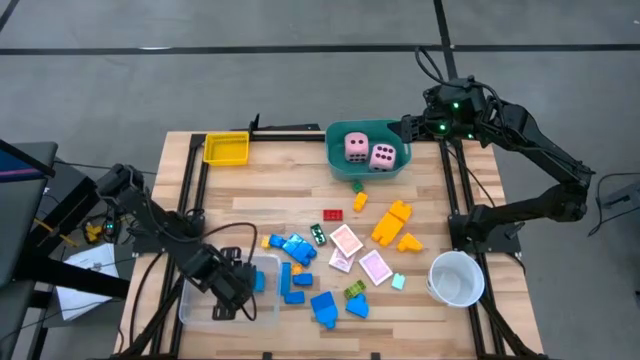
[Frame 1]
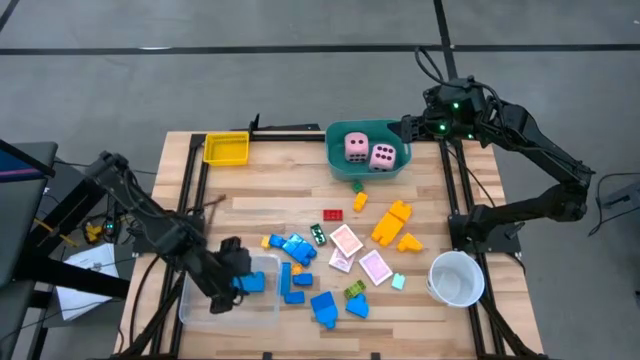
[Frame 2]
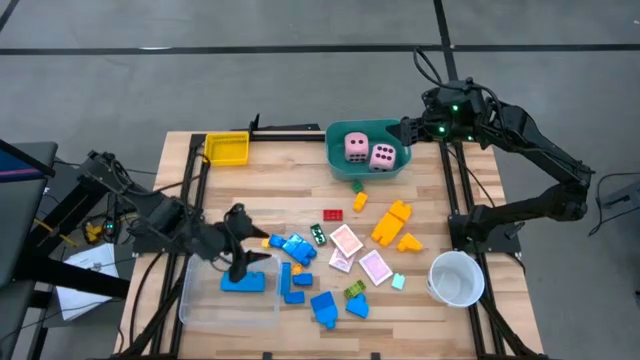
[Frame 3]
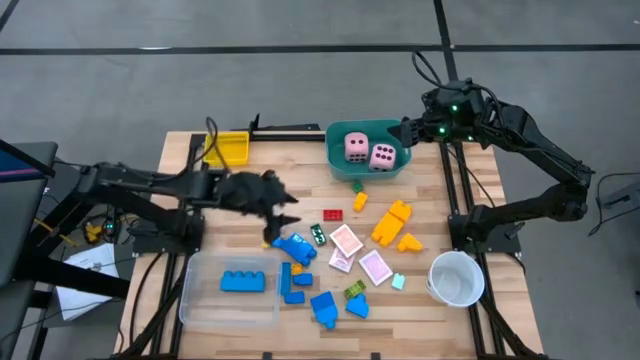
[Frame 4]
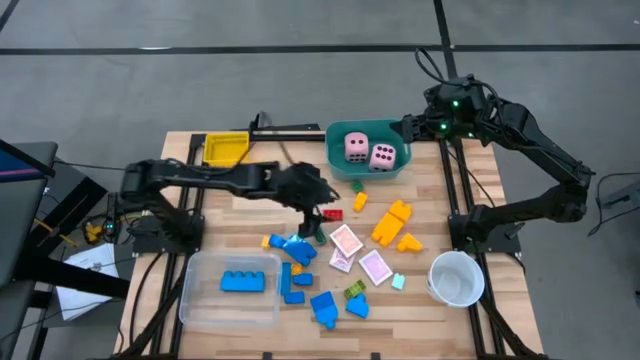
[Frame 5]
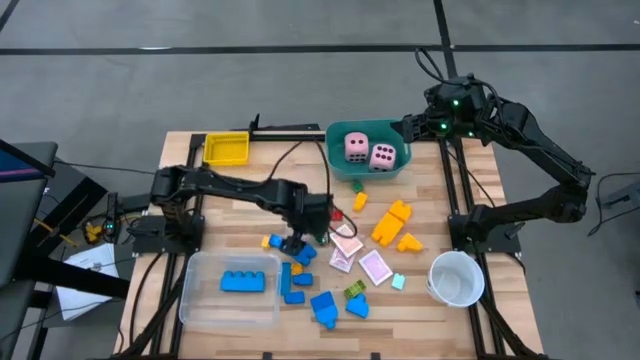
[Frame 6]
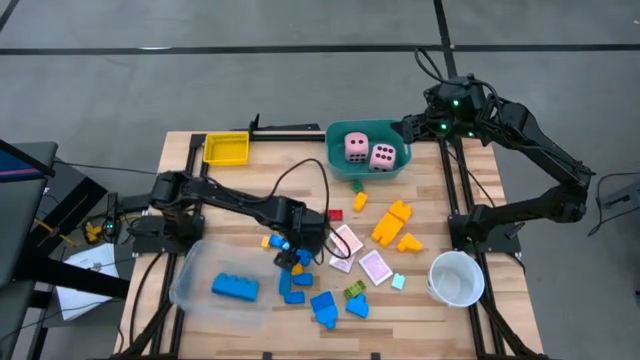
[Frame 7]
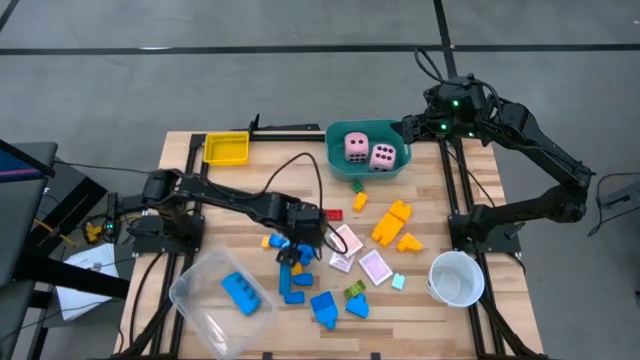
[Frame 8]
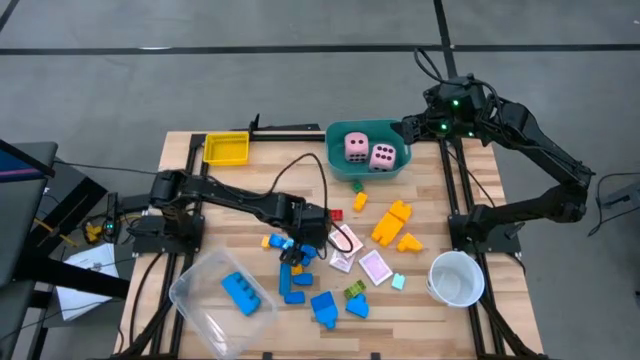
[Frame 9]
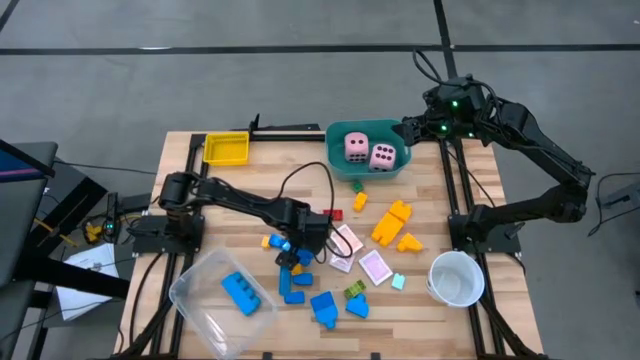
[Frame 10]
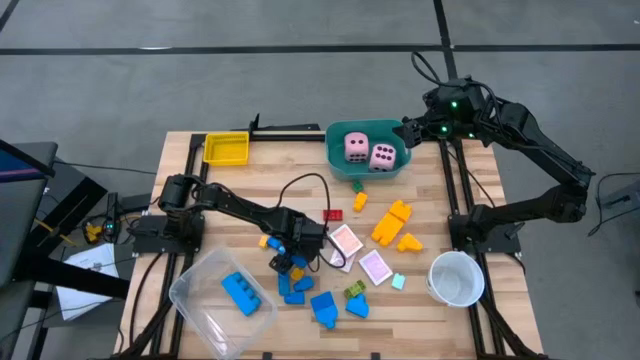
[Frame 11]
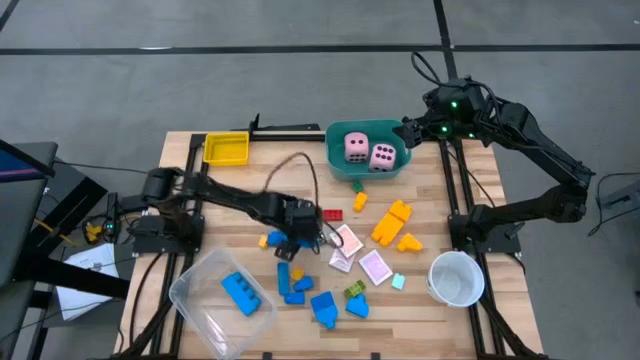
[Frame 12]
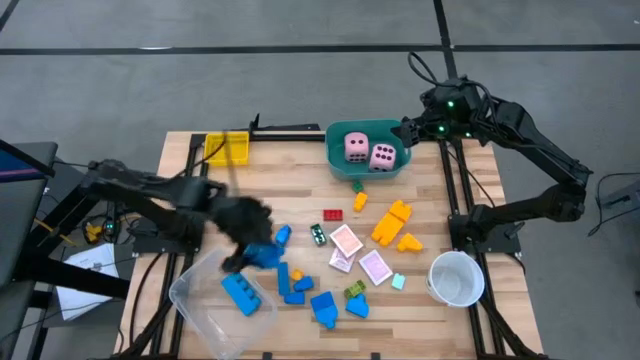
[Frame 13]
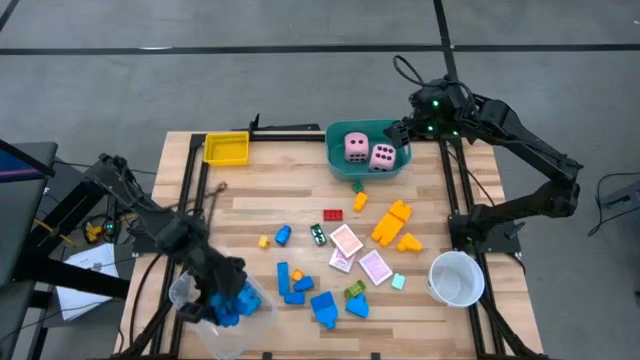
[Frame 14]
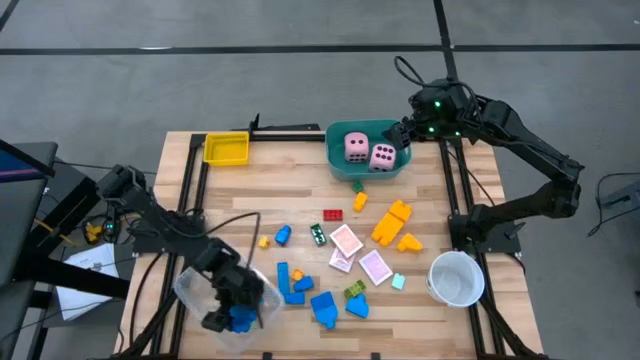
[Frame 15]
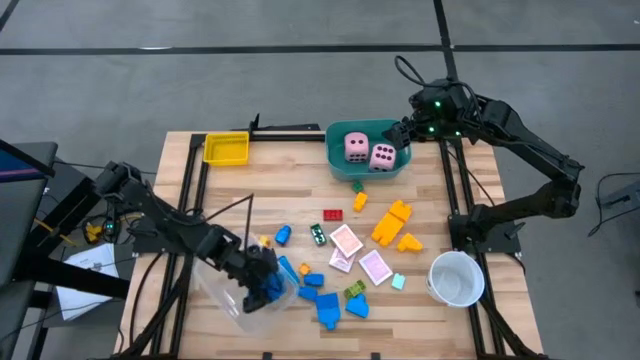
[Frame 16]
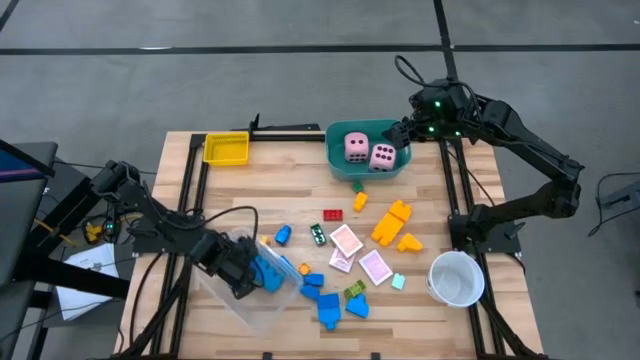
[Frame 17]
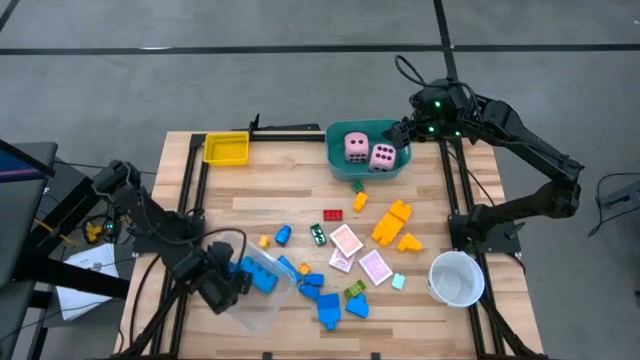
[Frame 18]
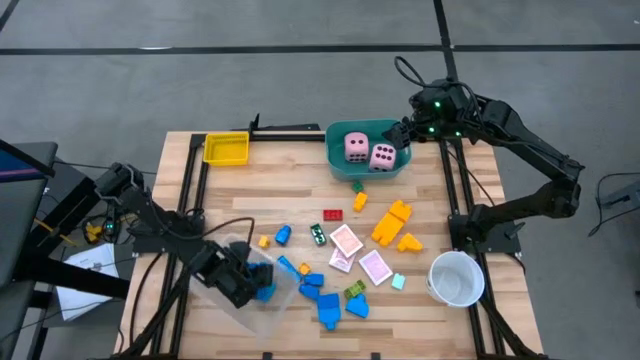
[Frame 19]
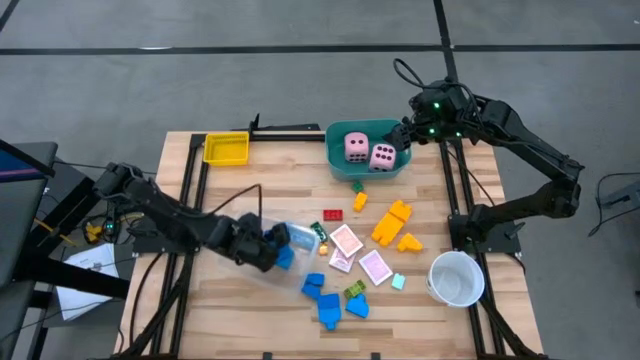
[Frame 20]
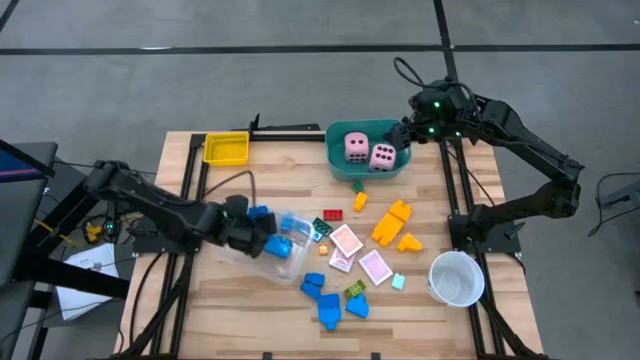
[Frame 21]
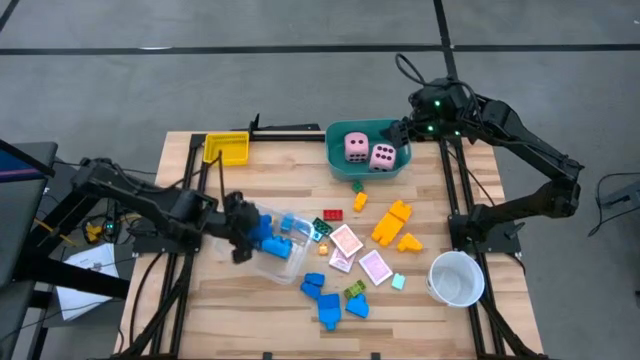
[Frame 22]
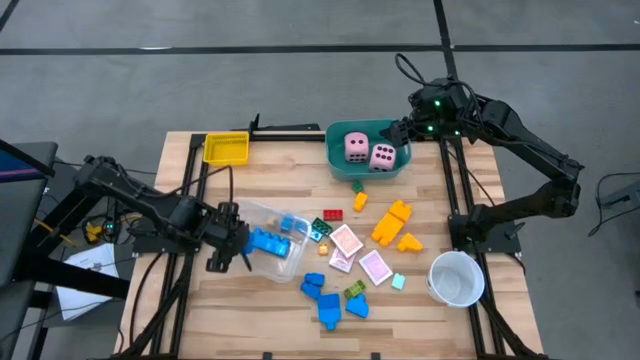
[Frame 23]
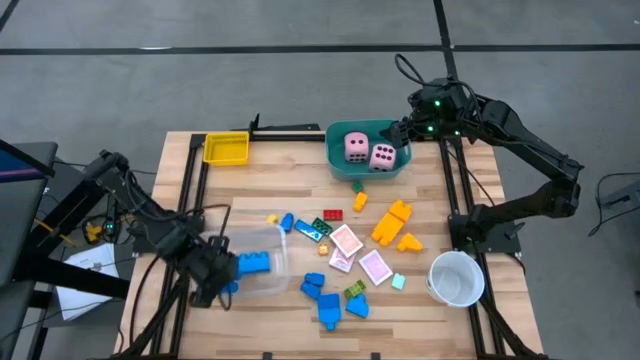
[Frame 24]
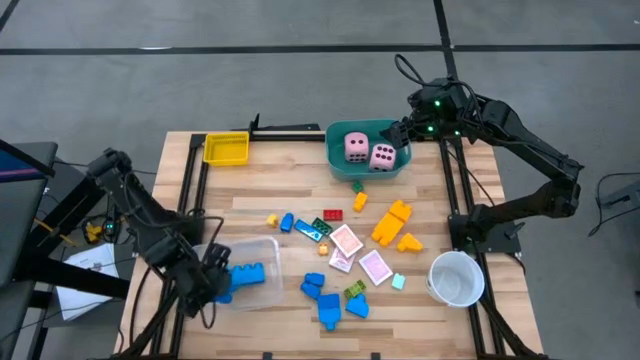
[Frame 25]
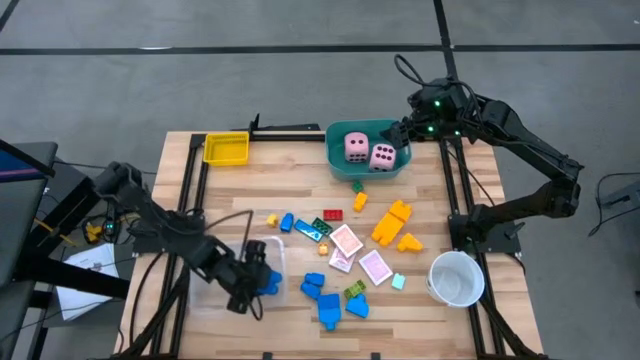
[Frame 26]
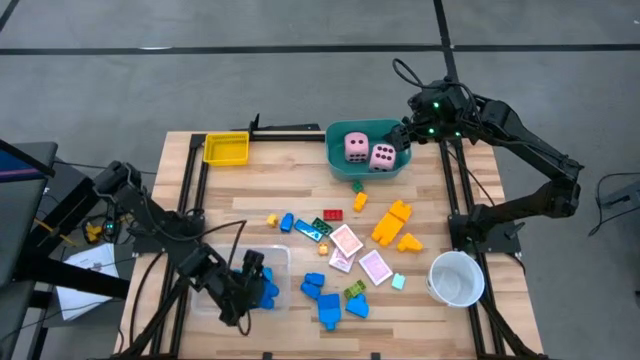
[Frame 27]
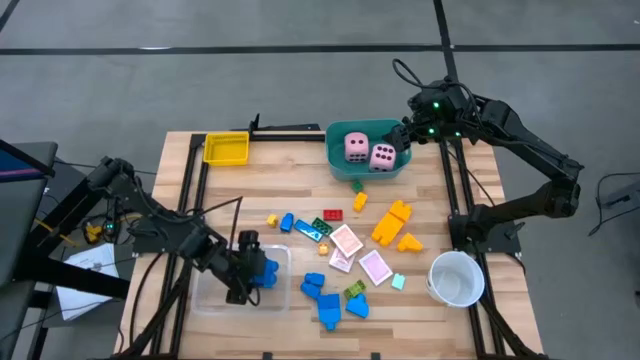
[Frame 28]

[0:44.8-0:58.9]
Task: Pick & Place Toys
Put the blue game pieces into the transparent bin

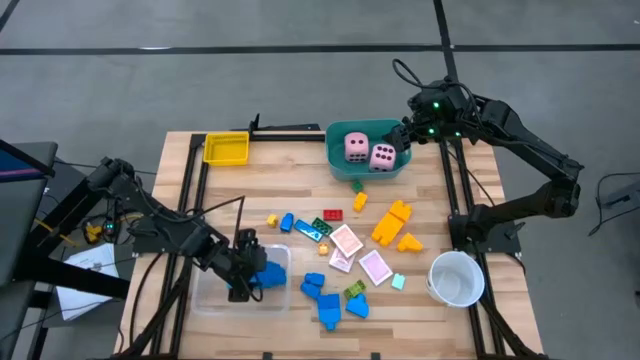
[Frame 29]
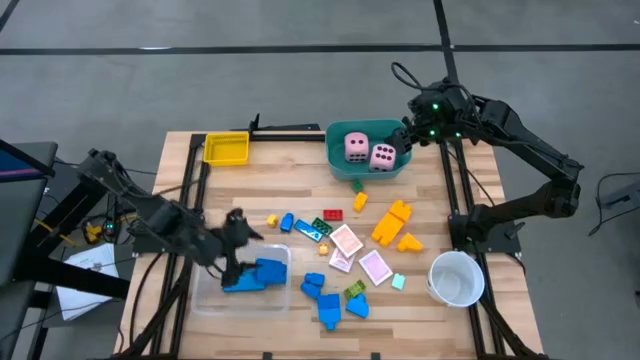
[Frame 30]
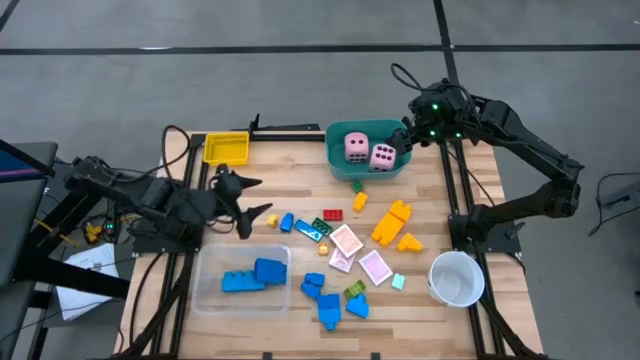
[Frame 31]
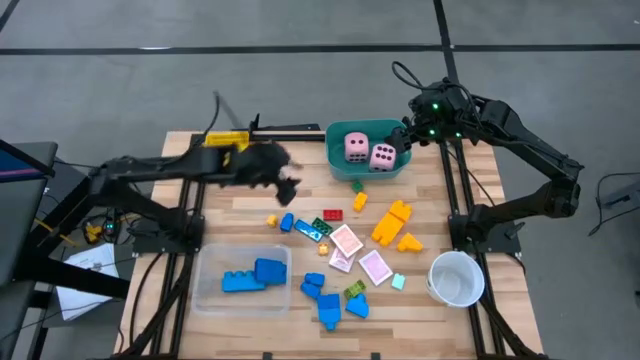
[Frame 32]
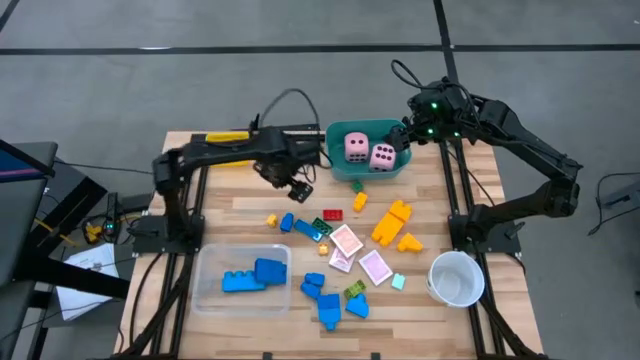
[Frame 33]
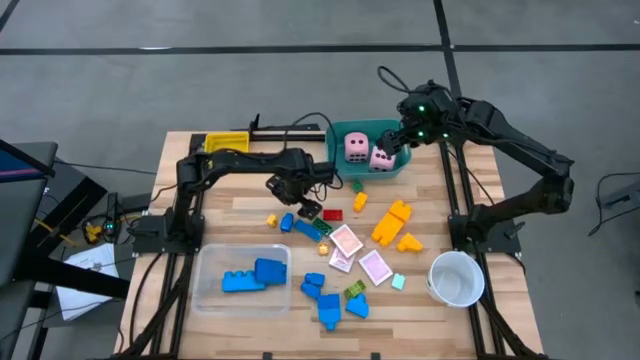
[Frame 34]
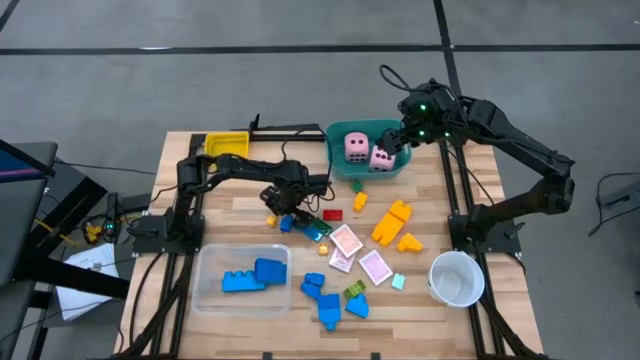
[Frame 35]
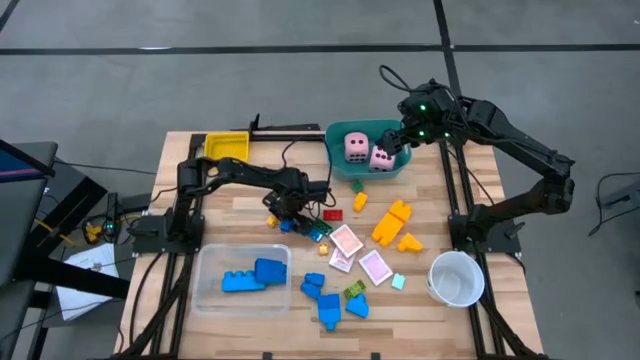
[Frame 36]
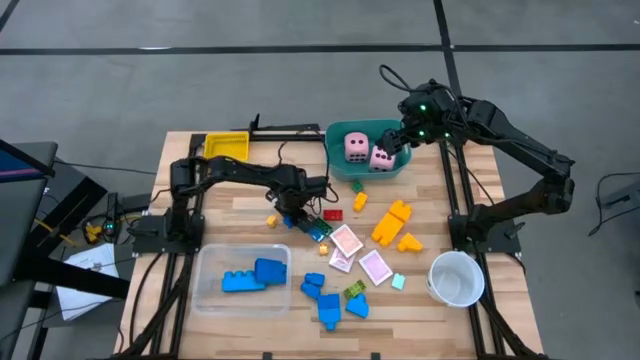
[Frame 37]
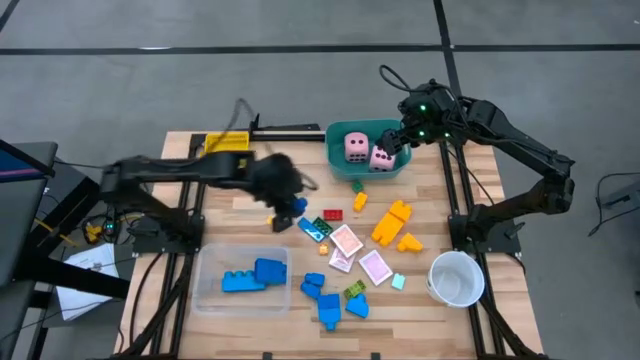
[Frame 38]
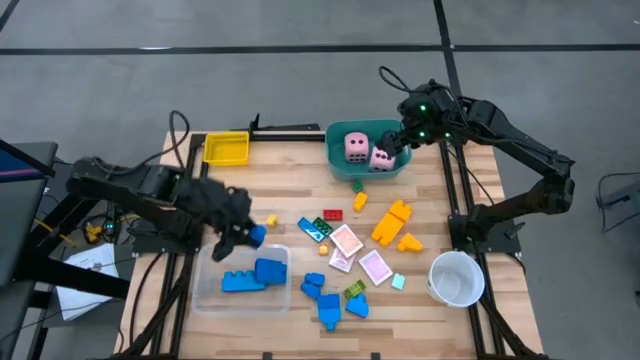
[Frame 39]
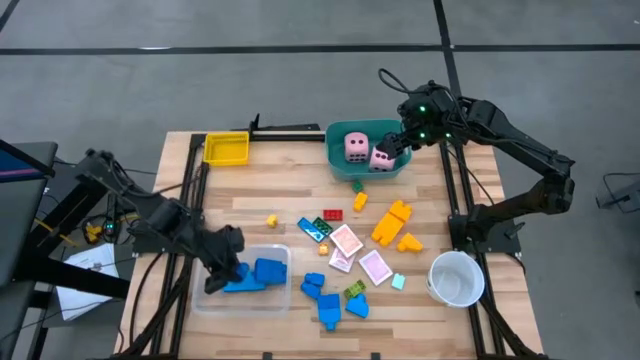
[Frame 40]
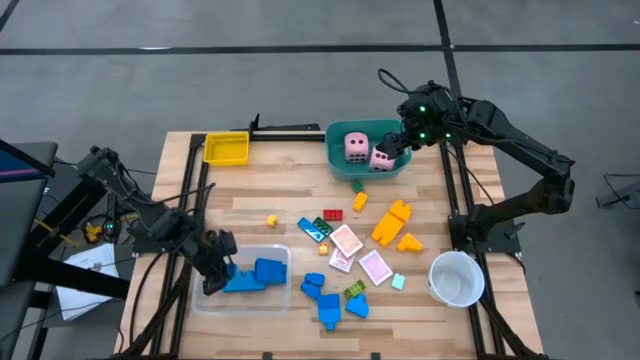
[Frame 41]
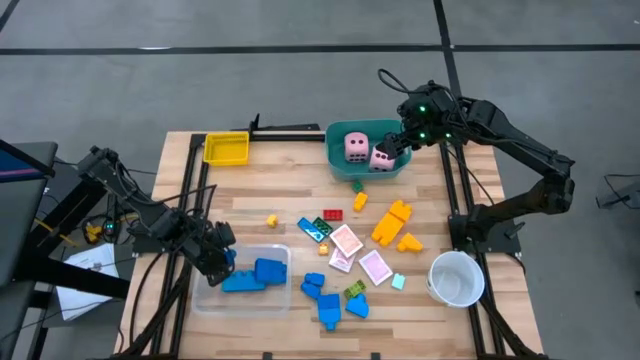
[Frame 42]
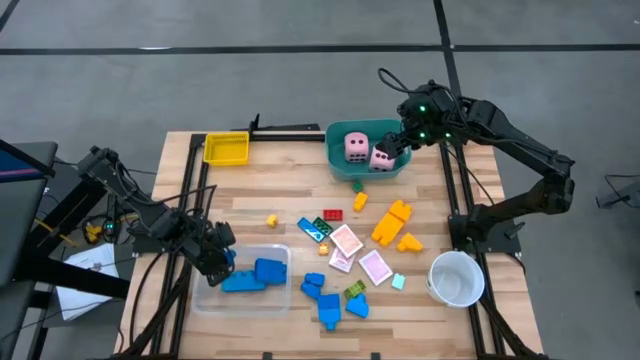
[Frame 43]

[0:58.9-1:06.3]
Put the blue game piece into the transparent bin
